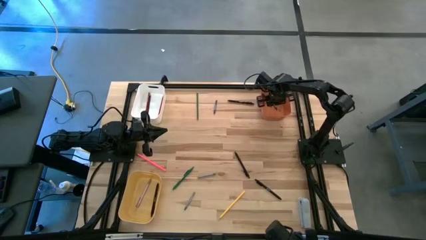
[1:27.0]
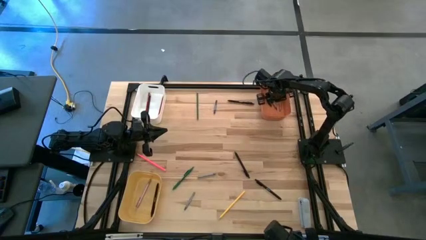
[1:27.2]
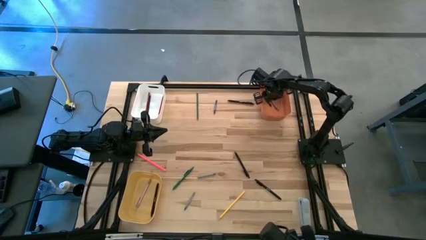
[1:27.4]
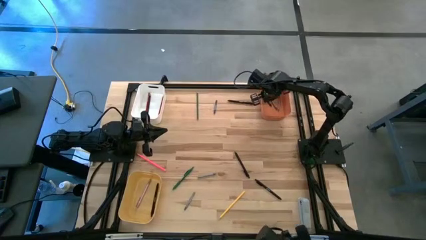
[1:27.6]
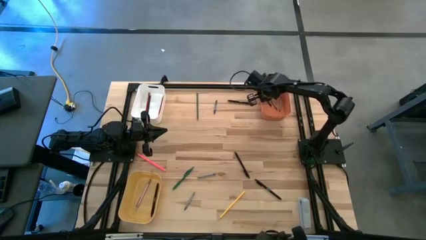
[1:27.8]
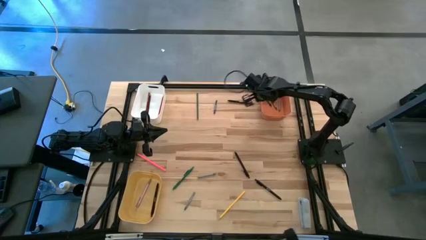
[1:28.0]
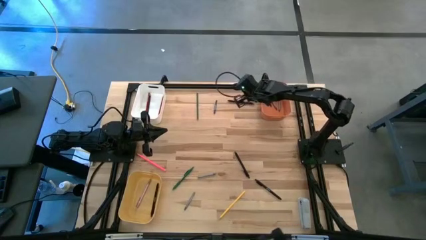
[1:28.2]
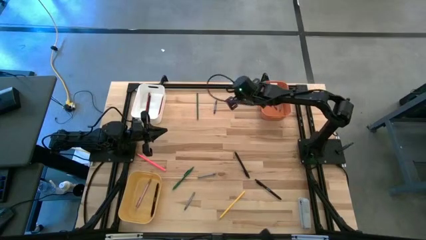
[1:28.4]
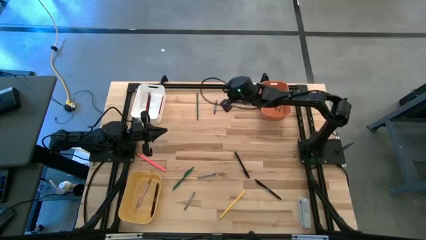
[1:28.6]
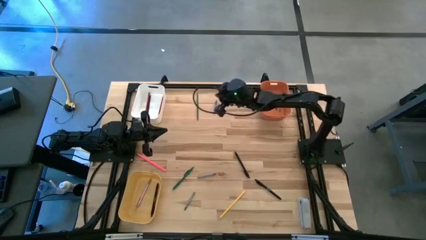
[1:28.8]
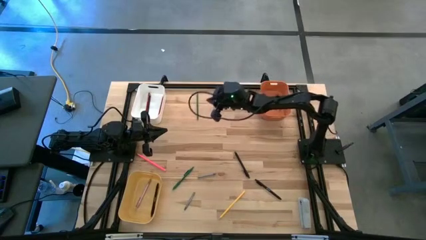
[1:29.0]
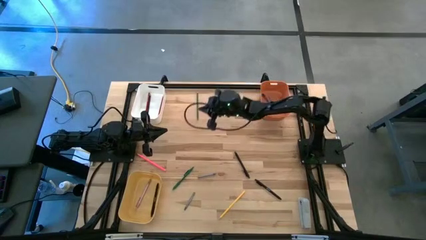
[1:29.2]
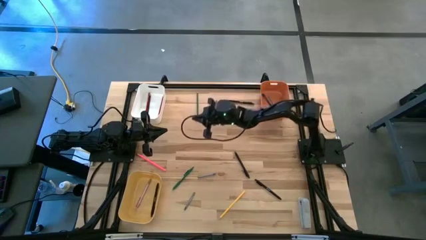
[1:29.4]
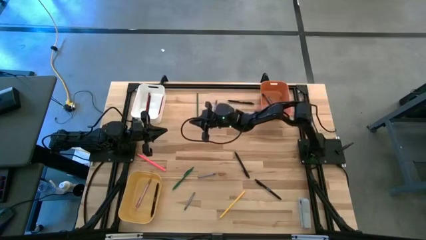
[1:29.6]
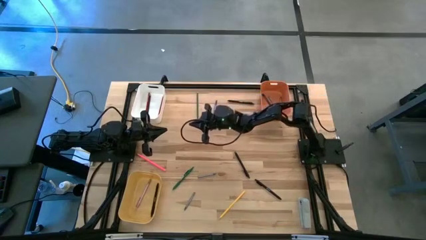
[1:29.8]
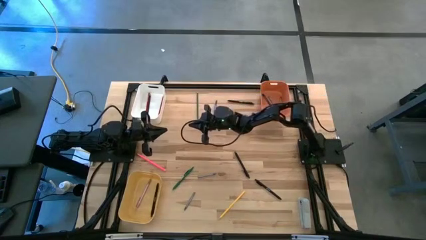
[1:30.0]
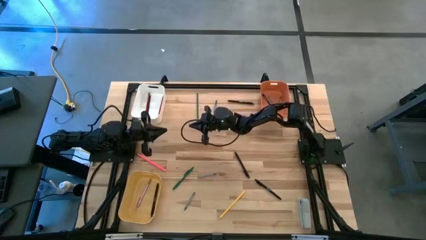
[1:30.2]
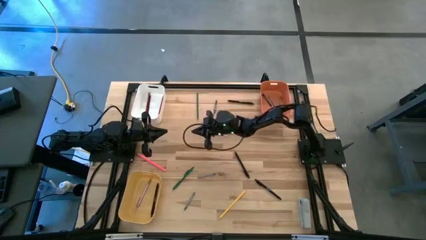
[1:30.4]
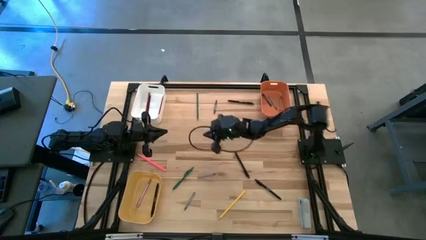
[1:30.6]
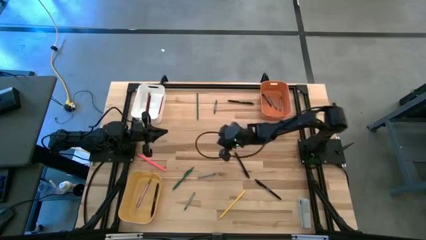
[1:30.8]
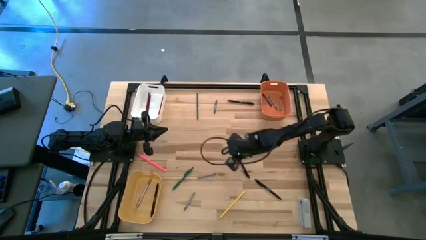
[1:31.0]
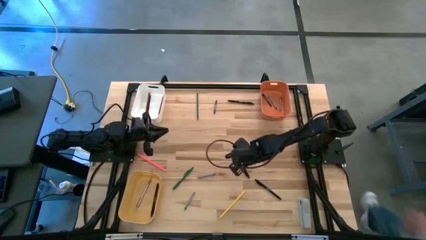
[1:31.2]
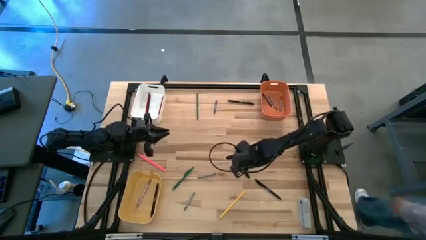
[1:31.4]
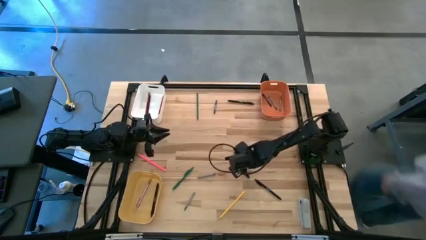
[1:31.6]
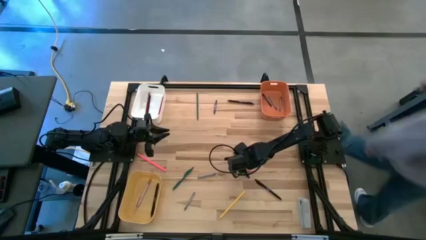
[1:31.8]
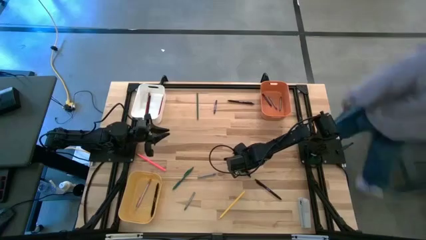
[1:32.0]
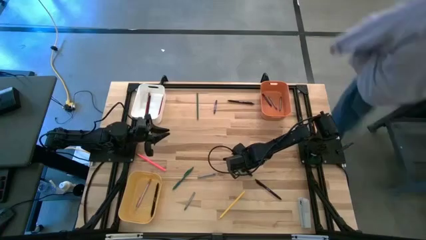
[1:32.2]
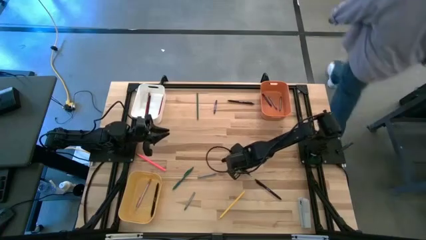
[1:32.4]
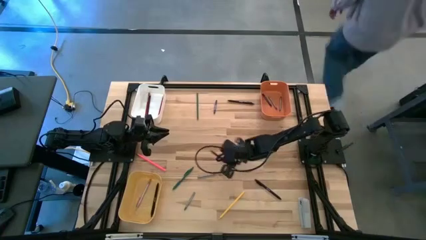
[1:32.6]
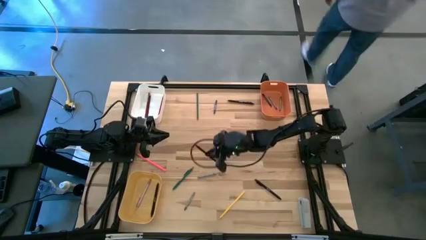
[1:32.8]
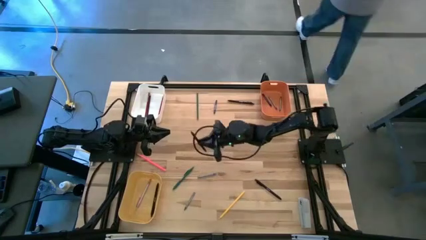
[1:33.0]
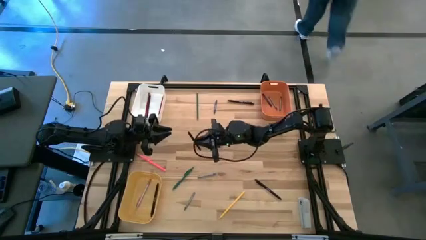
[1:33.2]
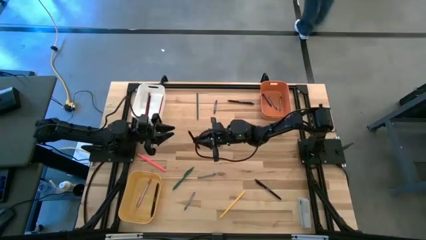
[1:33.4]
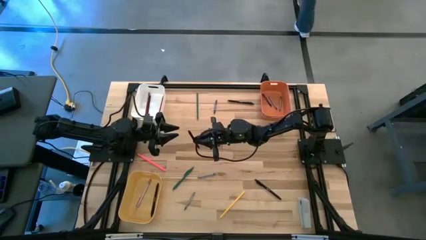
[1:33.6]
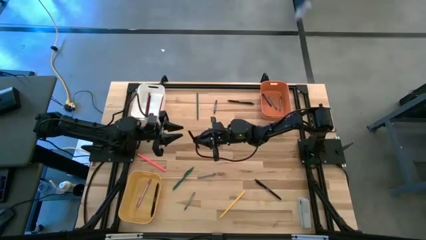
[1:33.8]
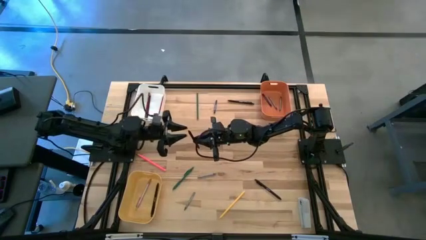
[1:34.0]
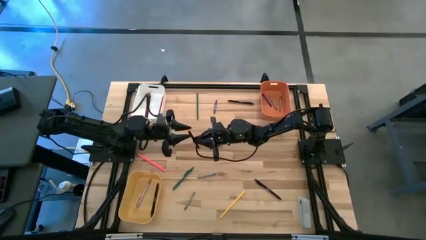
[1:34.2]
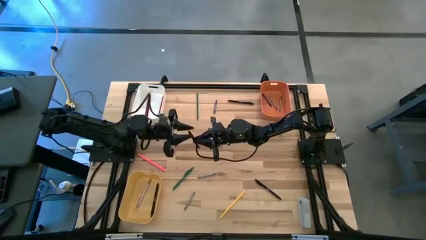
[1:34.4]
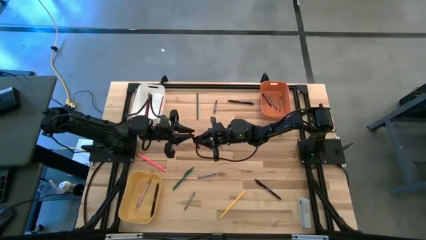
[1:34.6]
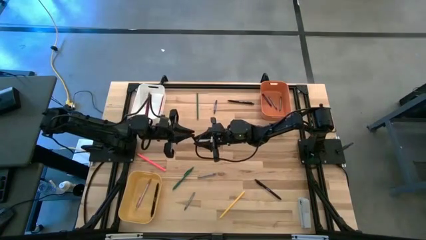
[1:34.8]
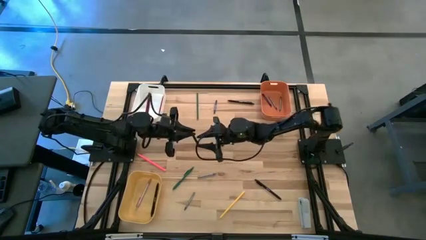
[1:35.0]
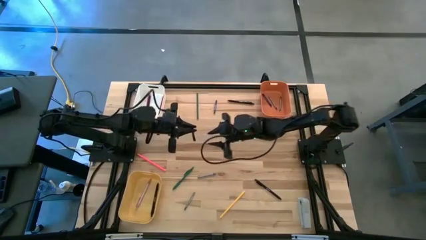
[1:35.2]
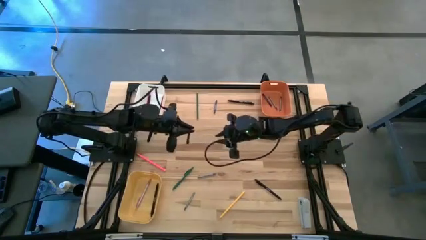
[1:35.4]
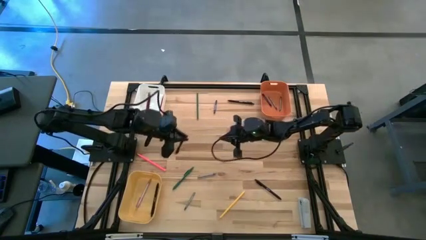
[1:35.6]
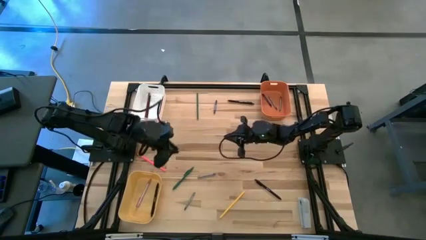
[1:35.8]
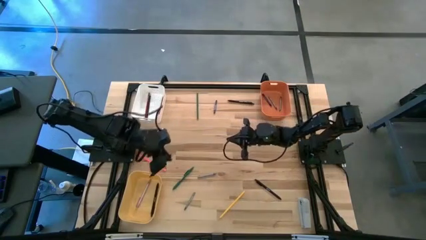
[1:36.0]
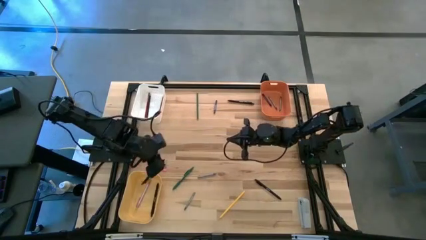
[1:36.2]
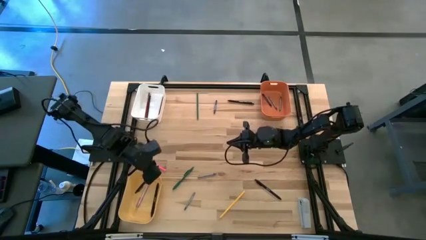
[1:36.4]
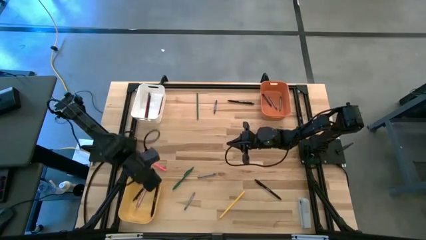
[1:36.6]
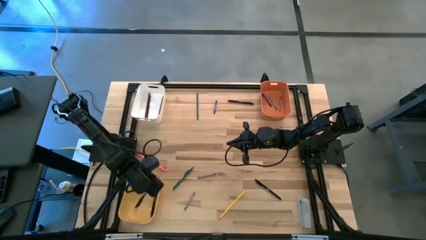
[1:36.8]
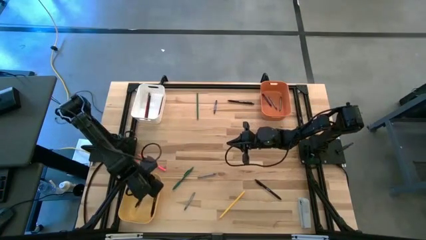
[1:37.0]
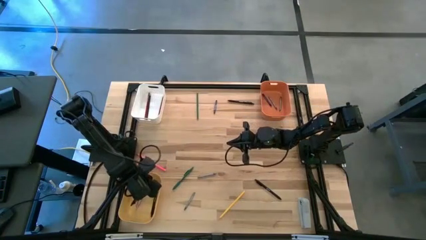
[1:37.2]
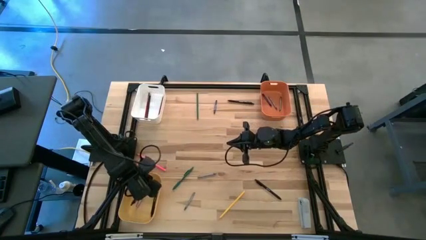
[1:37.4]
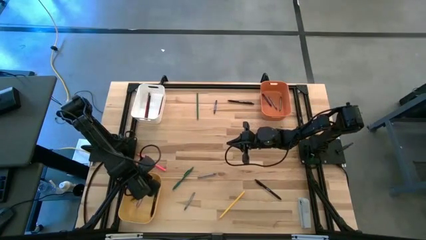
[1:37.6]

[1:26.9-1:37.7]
Task: Sort crayons/erasers/pens/pencils in bins
Put the middle black pen into the yellow bin

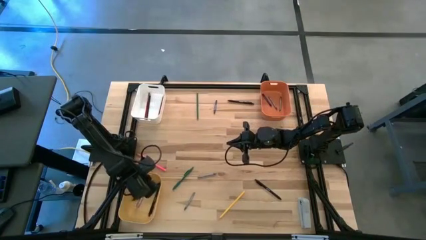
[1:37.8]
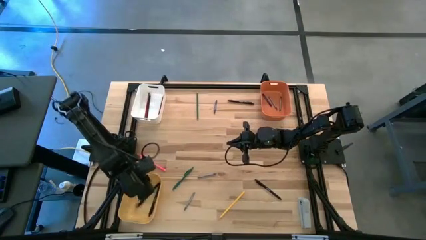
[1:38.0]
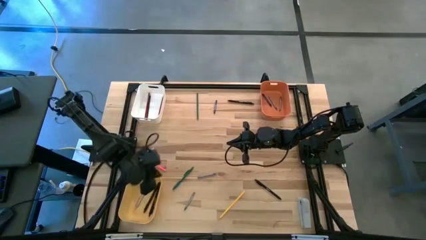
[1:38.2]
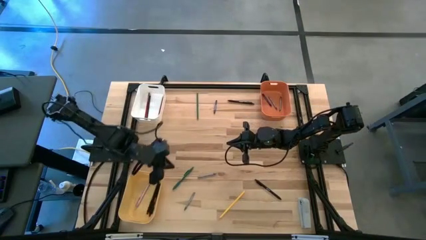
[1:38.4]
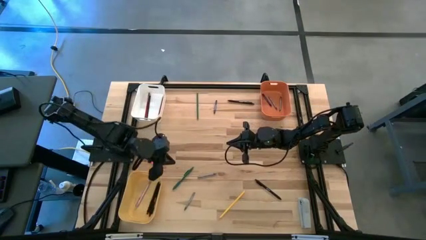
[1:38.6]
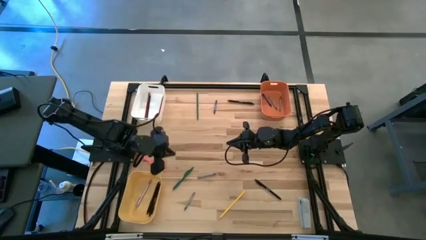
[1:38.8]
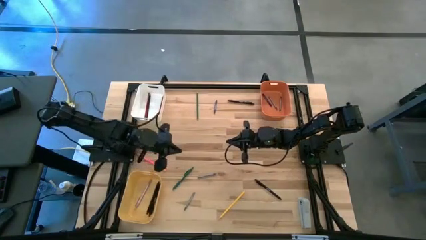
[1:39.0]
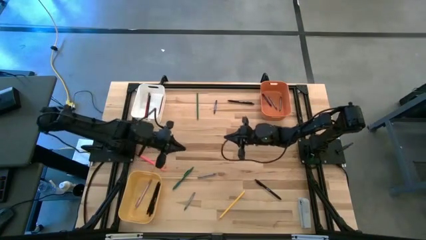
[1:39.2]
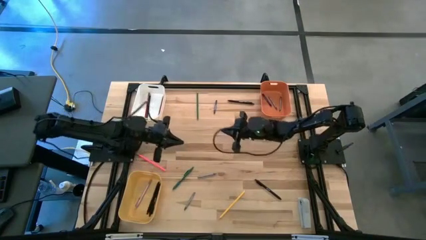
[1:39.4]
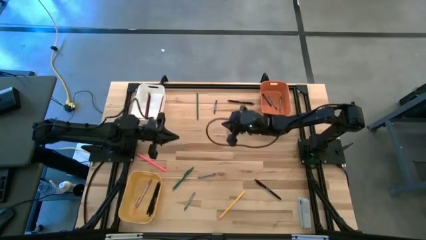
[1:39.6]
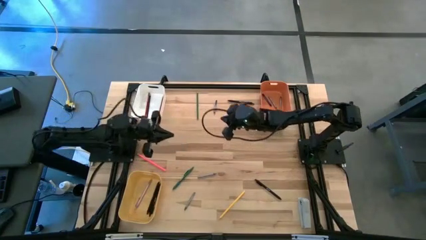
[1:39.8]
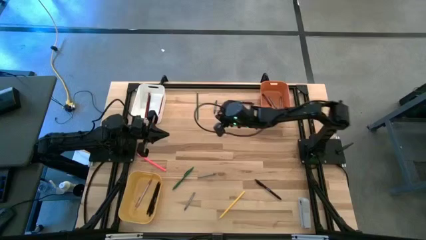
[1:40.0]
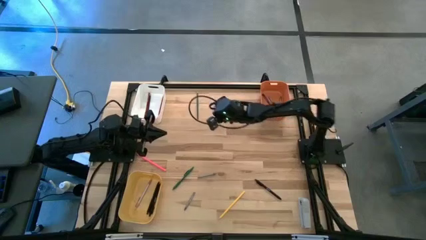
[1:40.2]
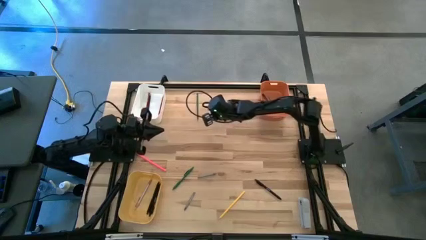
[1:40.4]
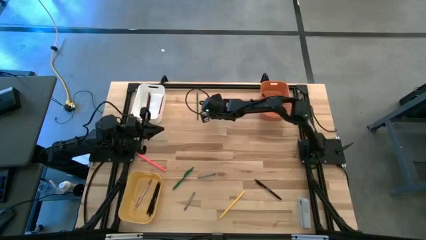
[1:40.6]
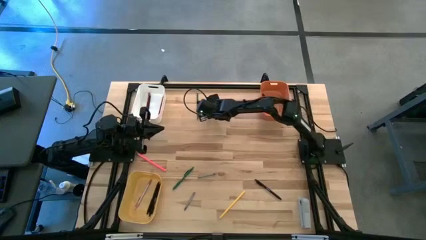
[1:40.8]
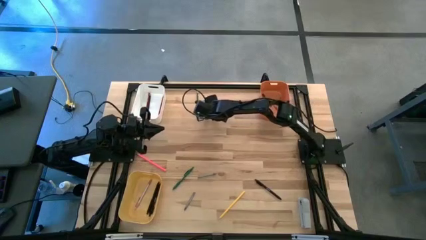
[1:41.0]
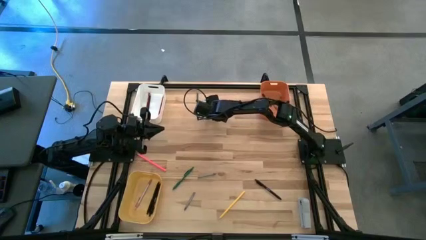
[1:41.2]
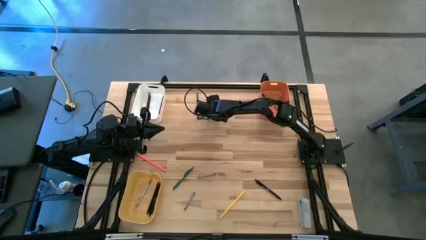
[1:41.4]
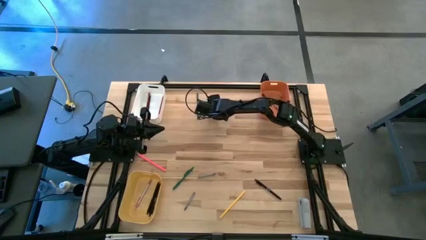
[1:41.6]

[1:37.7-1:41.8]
Put the blue crayon into the orange bin
